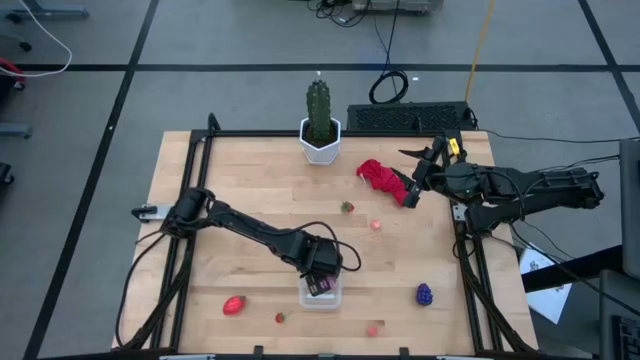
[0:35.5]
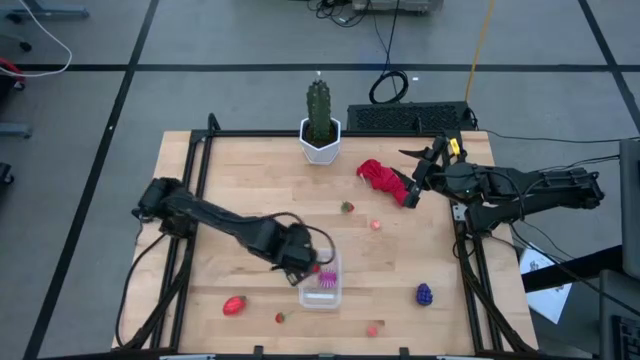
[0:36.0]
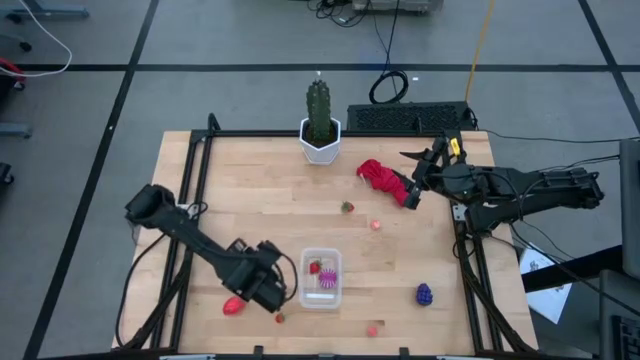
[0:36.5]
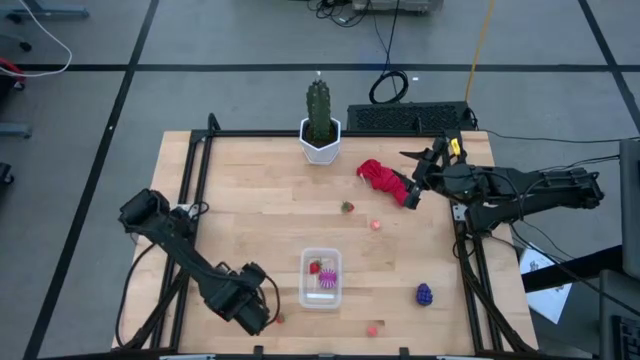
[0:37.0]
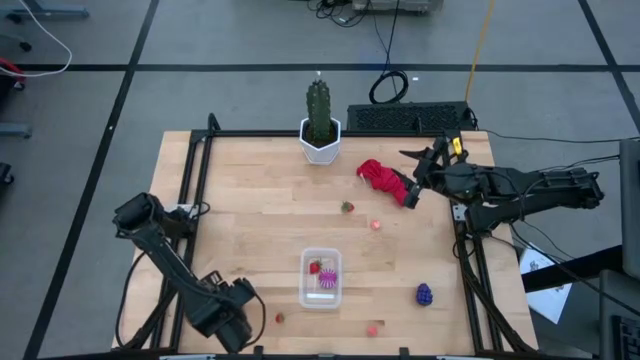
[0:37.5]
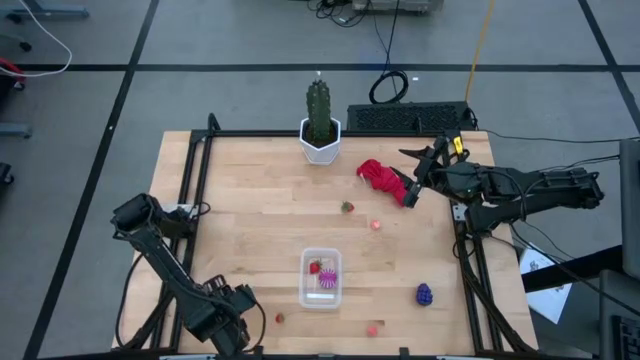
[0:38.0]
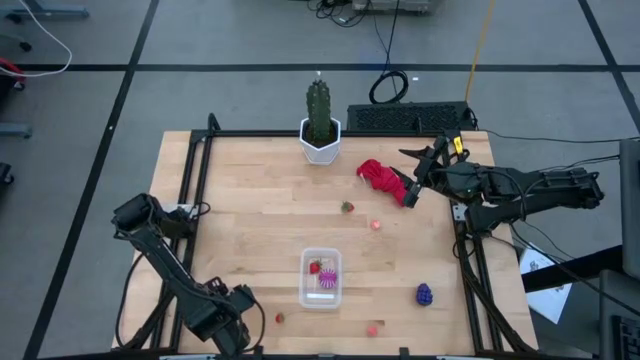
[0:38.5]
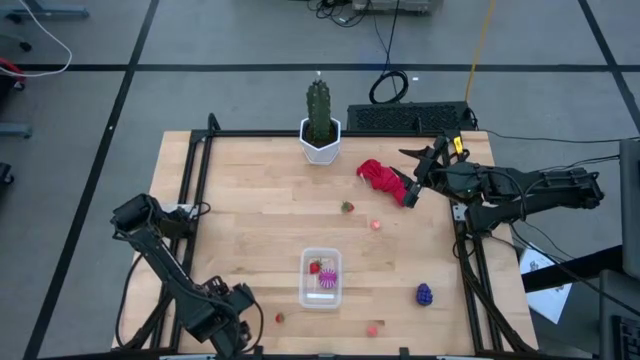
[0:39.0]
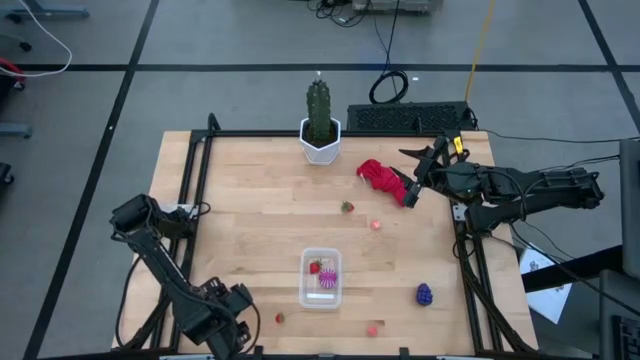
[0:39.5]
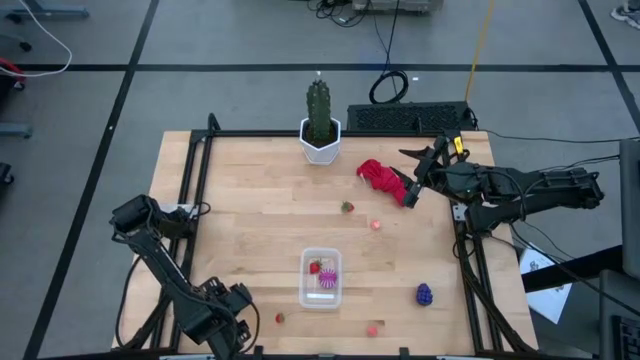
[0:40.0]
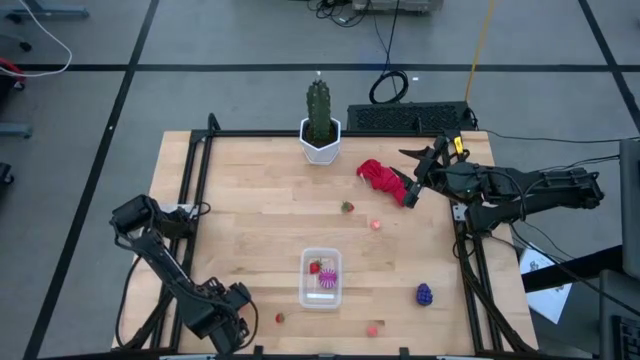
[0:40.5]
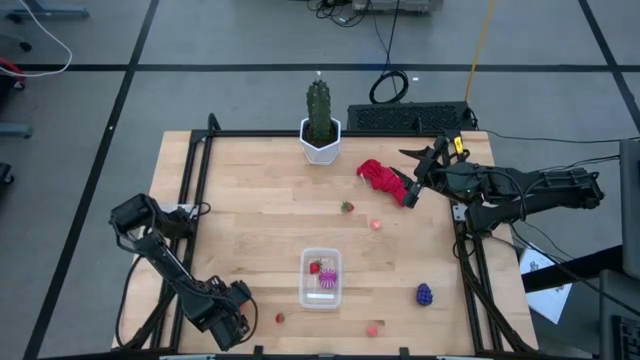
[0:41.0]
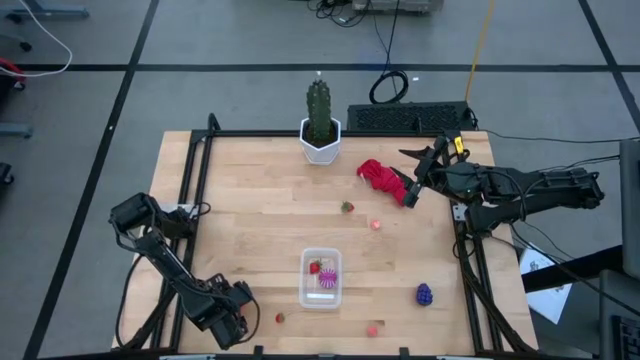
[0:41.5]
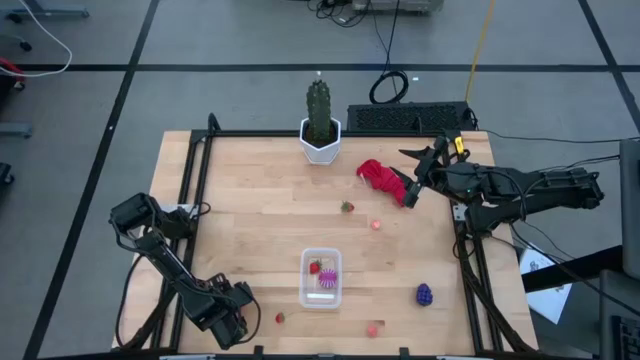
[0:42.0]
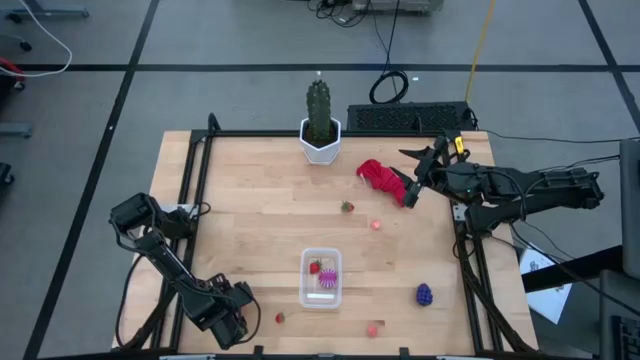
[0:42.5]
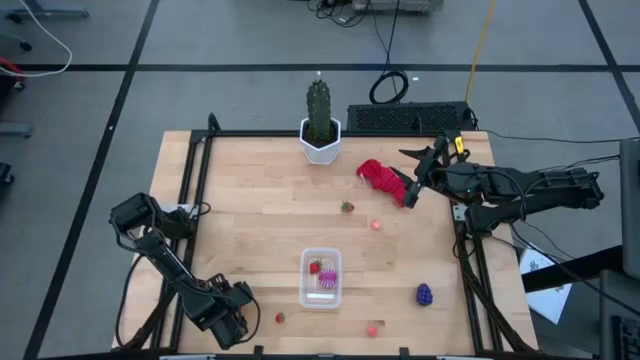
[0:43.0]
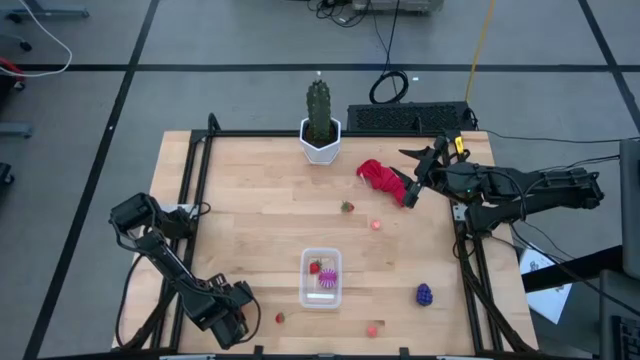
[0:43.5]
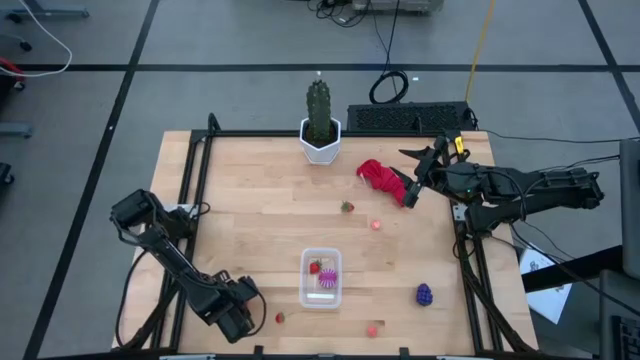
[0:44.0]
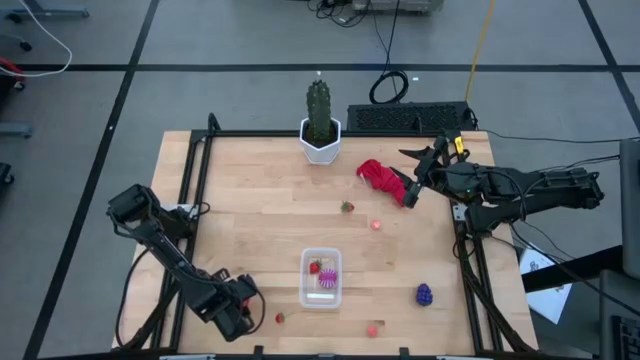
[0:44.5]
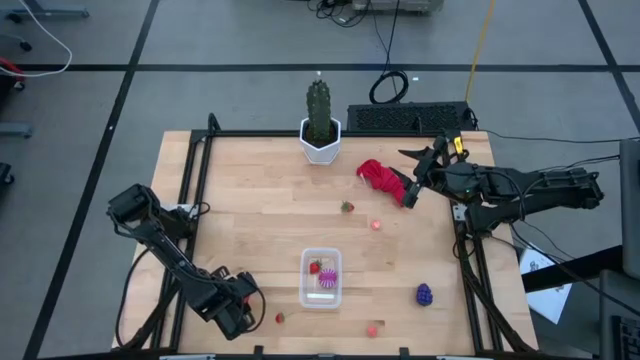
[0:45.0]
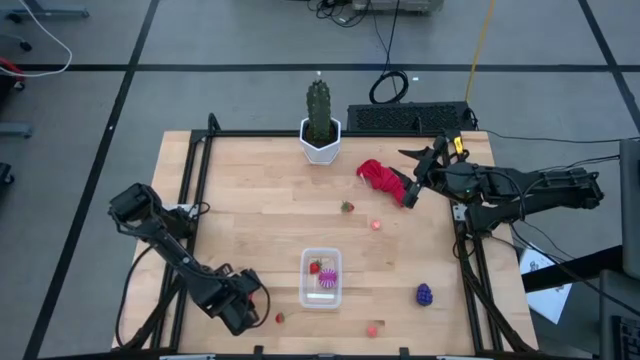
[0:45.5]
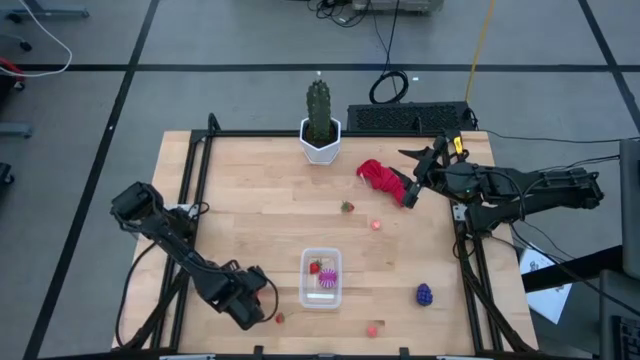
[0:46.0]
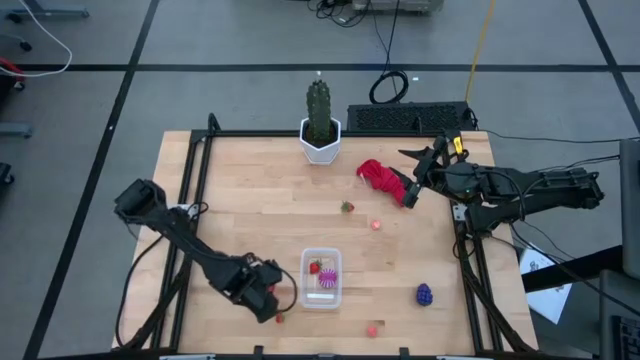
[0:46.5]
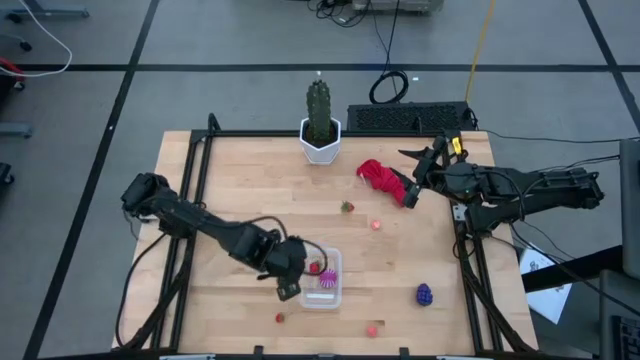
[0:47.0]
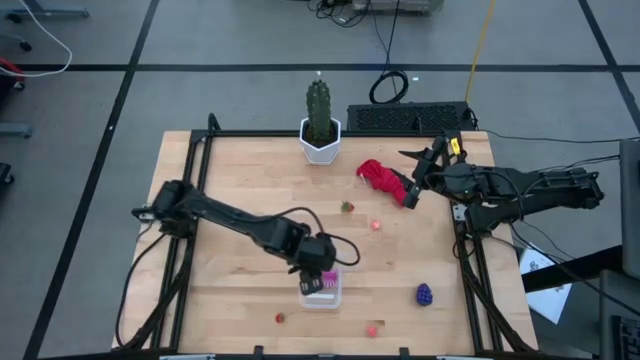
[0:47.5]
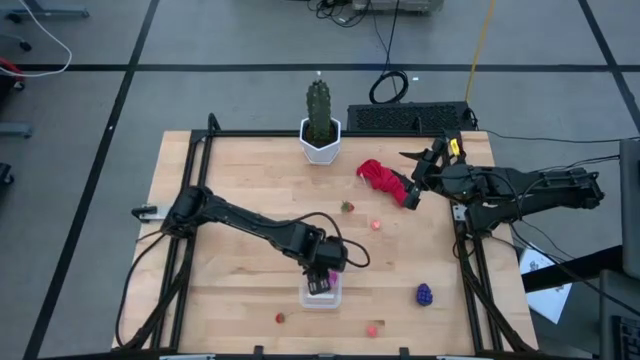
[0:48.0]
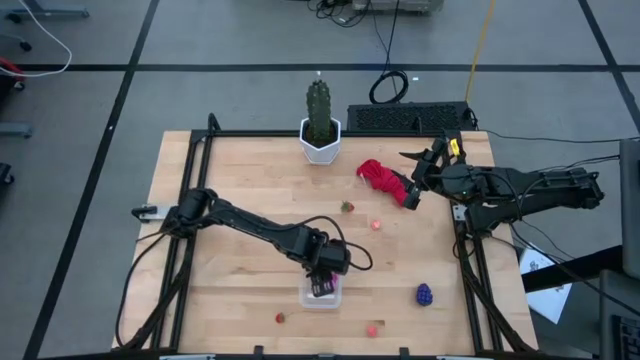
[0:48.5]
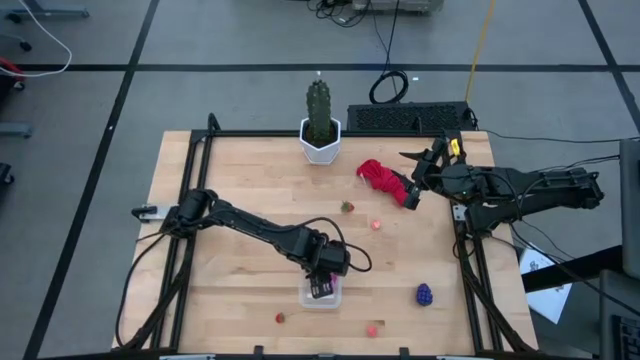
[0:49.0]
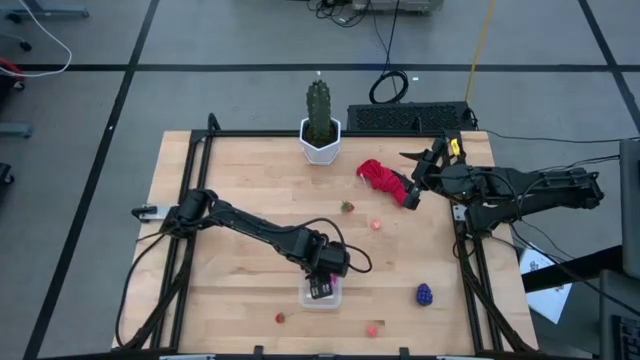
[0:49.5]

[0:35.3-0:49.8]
Task: Pick and placing Produce into tupperware
Put the dragonfruit into the transparent container

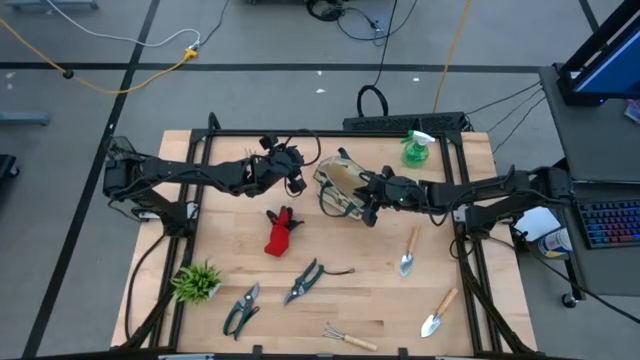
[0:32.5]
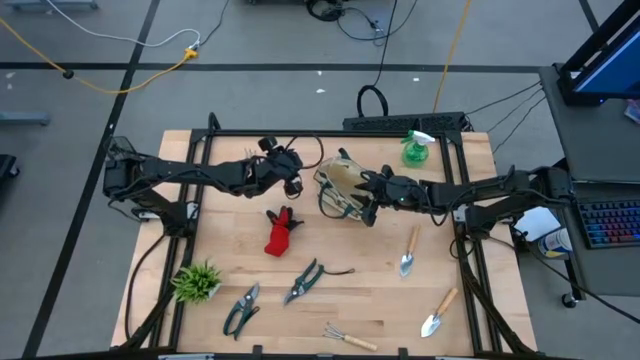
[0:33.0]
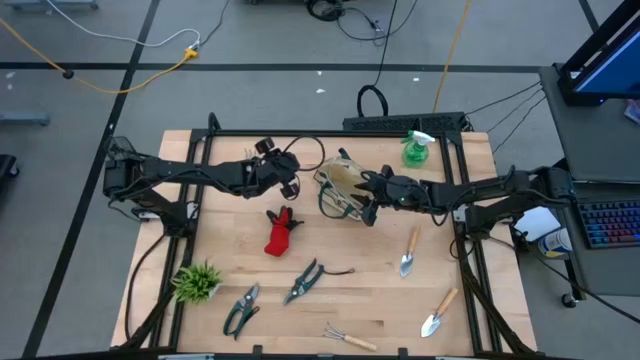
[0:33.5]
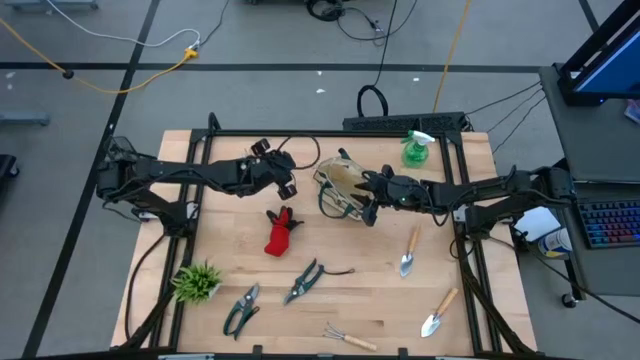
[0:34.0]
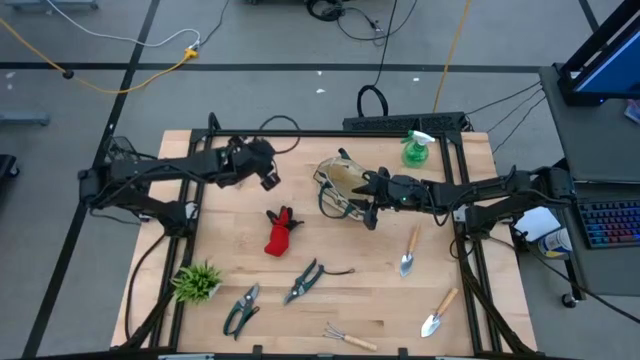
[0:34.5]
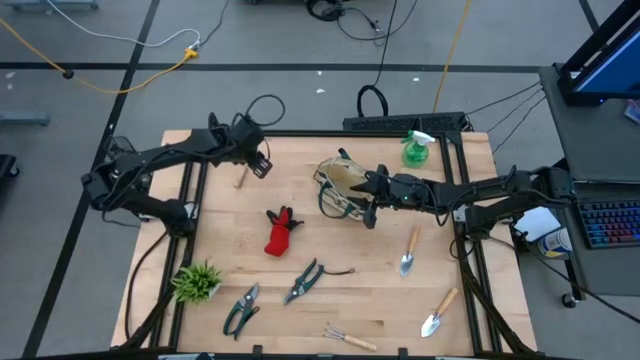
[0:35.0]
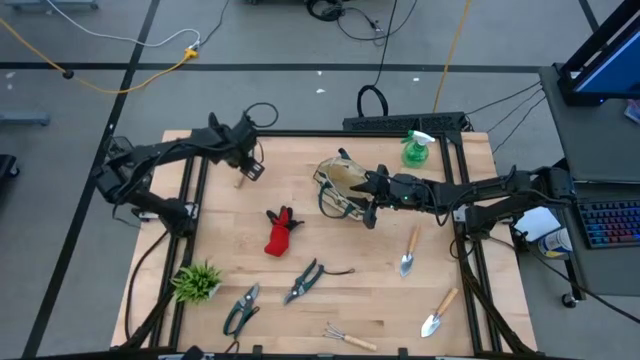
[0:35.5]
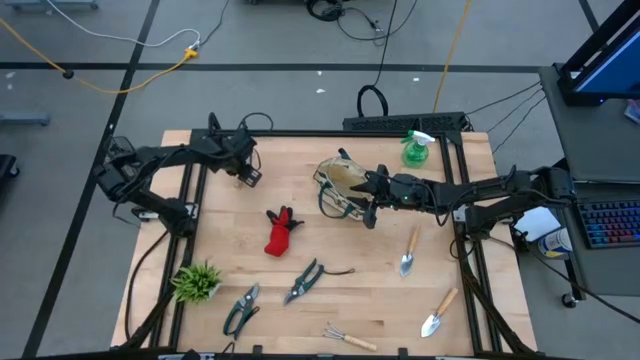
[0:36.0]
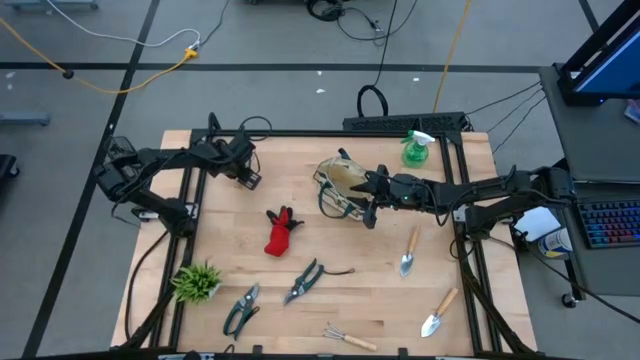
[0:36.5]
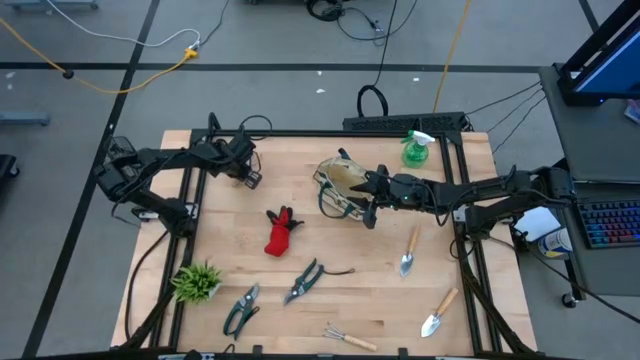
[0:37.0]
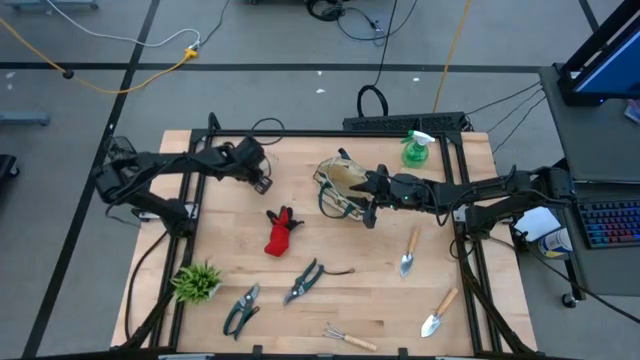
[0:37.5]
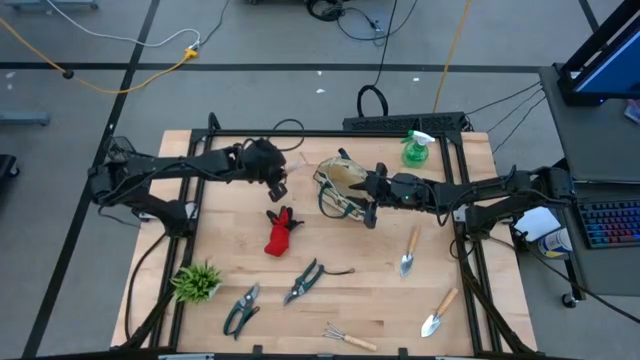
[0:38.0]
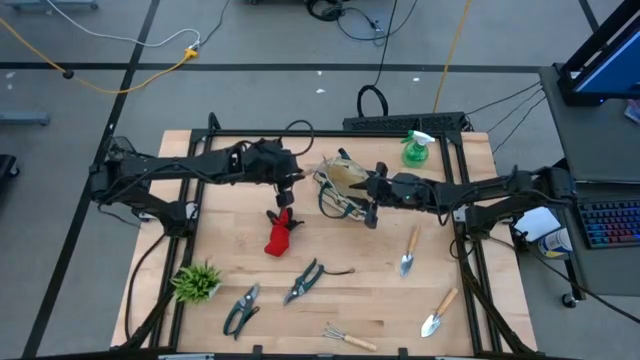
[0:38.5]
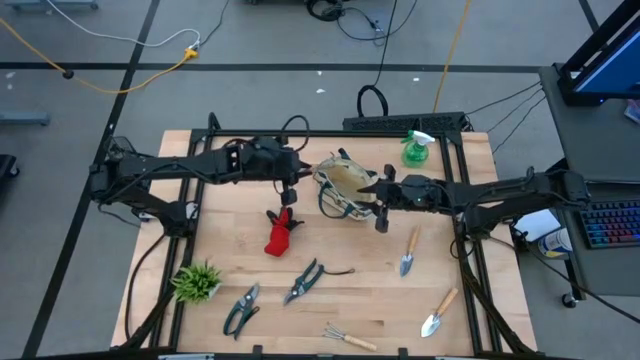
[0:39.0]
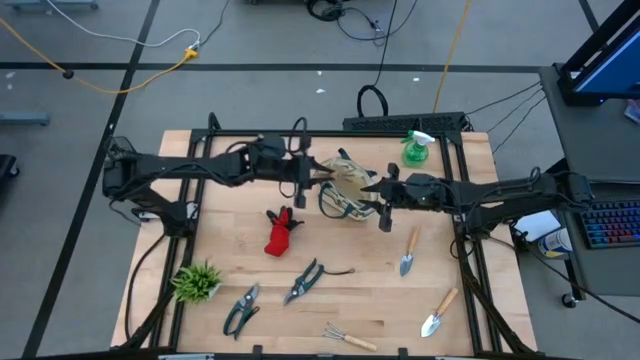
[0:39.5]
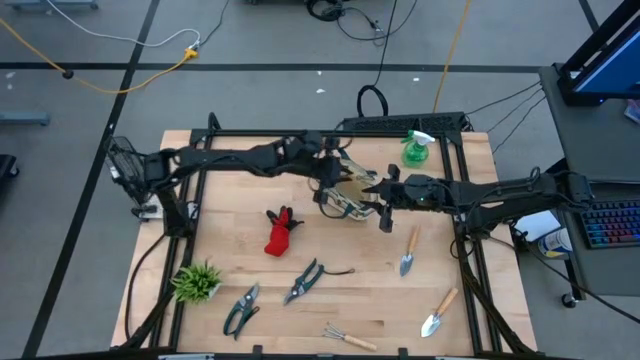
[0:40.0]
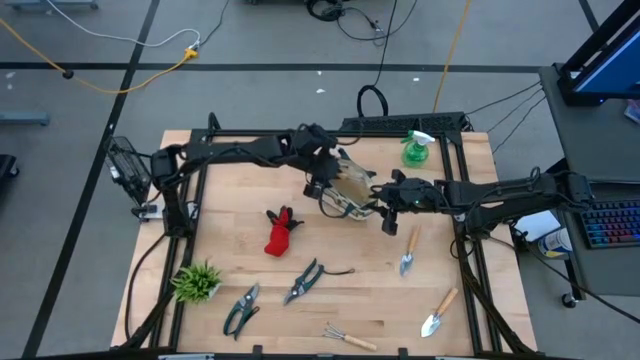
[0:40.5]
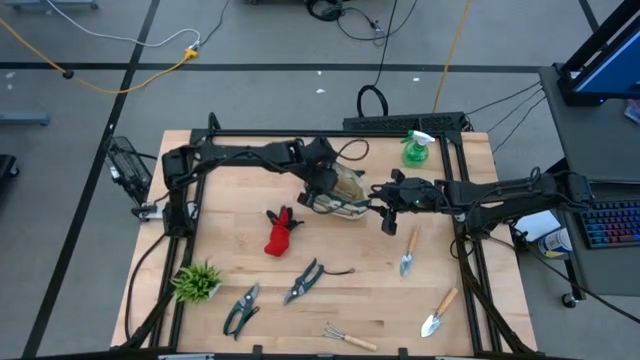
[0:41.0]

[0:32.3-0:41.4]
Task: Pick & Place Garden tools in Gardening bag
Put the top brown hand rake into the gardening bag
